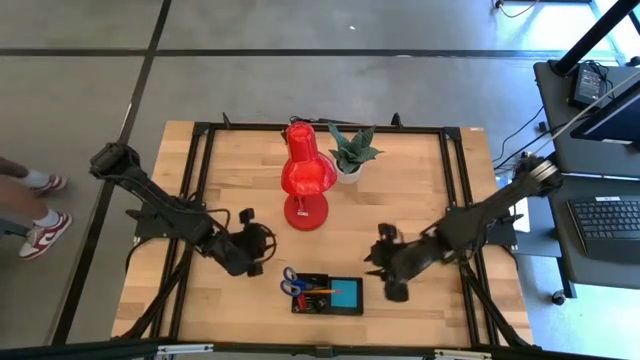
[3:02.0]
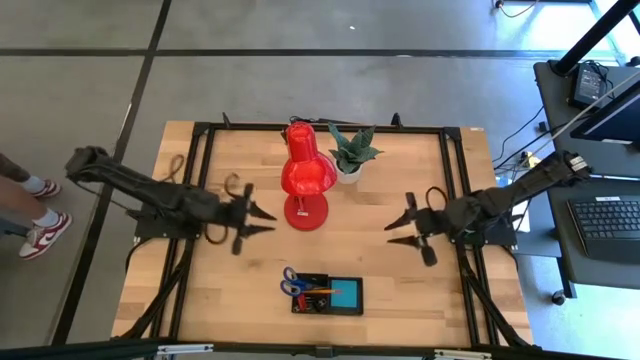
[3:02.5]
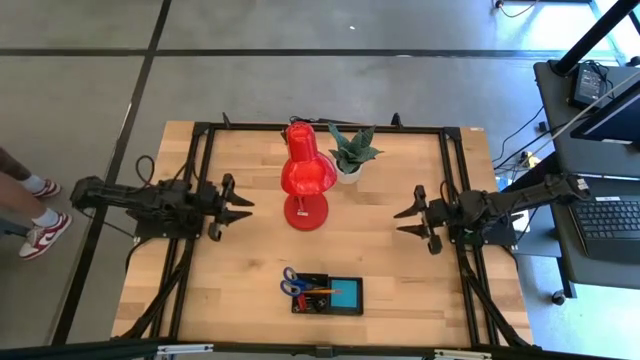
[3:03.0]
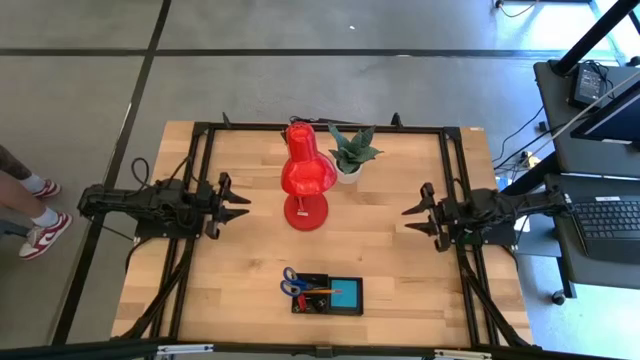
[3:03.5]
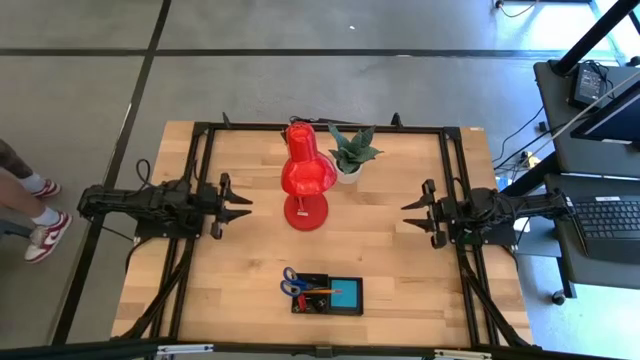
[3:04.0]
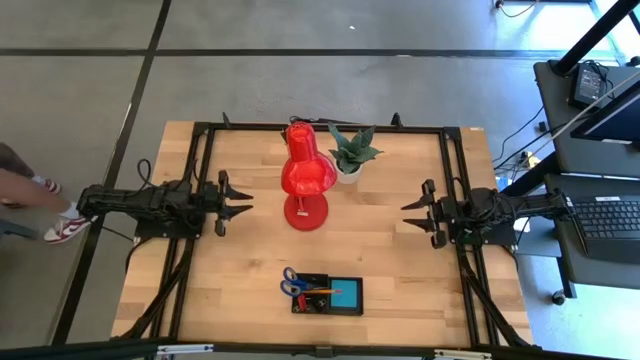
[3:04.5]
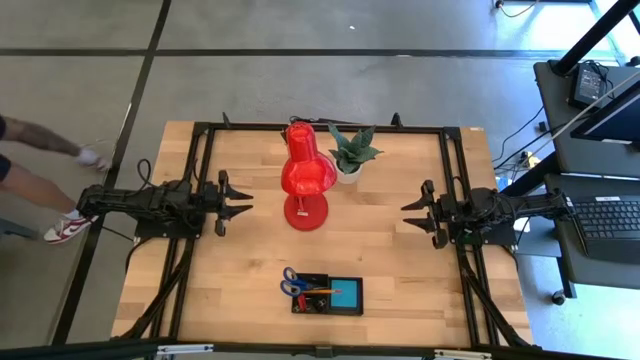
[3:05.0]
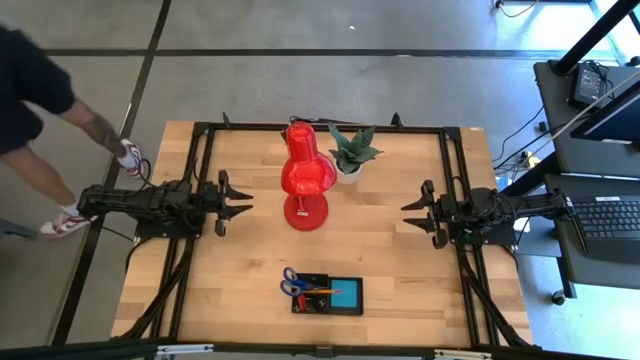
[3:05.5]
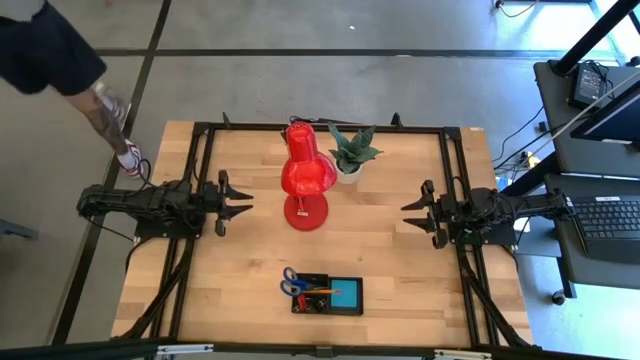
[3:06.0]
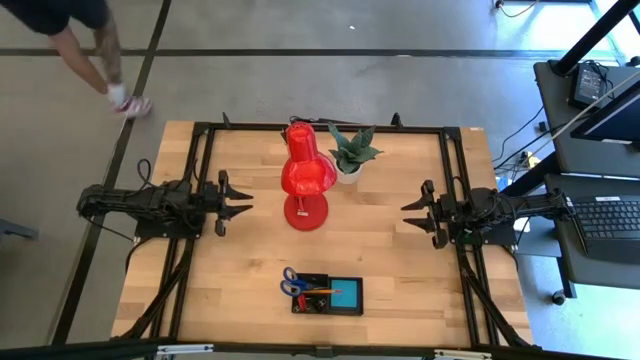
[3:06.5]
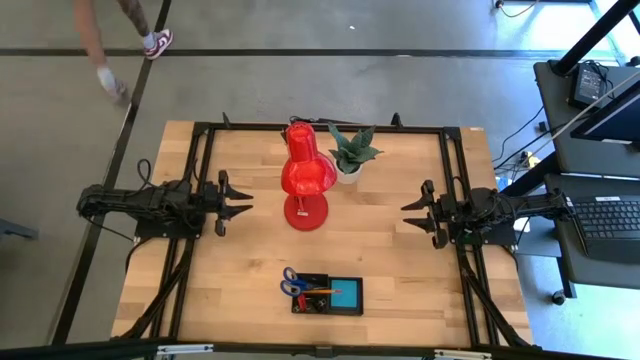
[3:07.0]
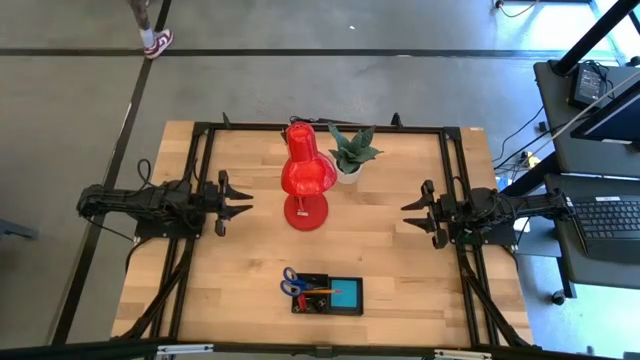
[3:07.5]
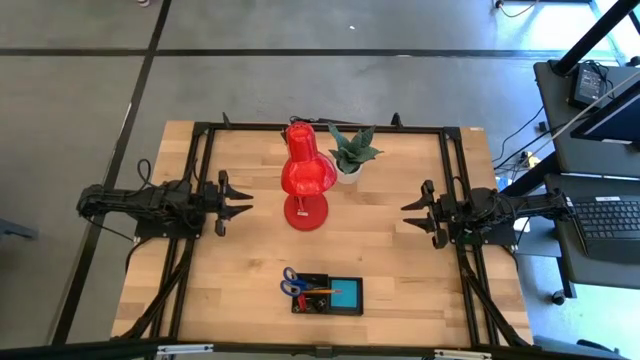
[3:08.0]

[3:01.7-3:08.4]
Task: Pick and place office supplies into organizer
Return to Home Position

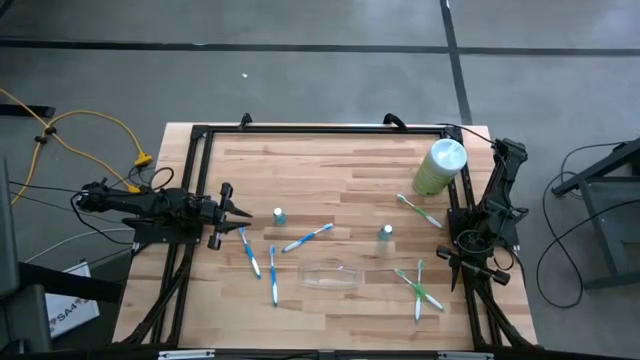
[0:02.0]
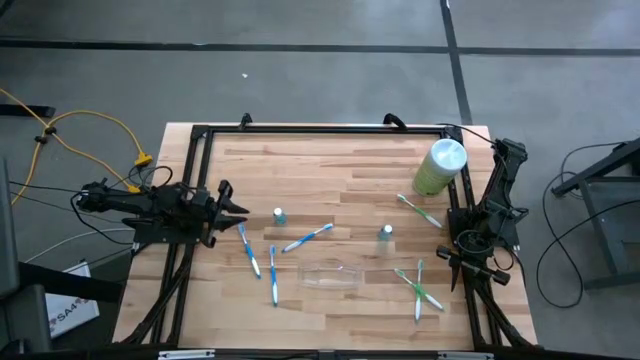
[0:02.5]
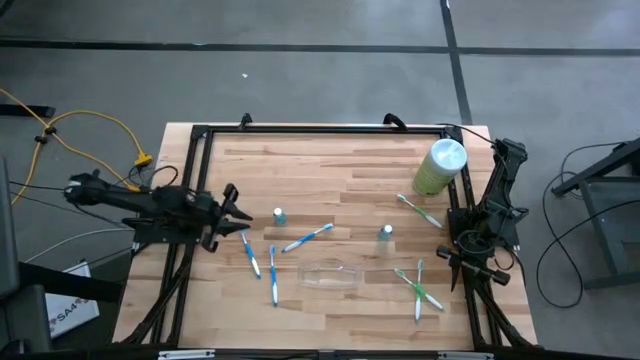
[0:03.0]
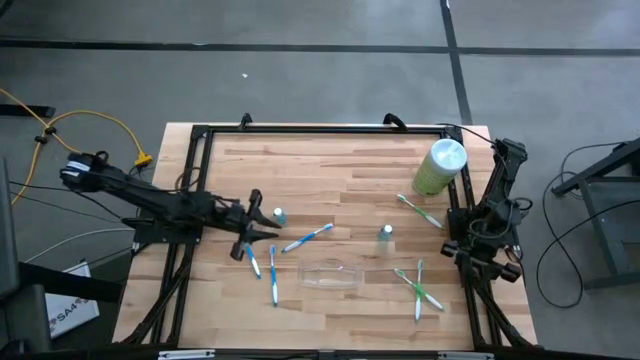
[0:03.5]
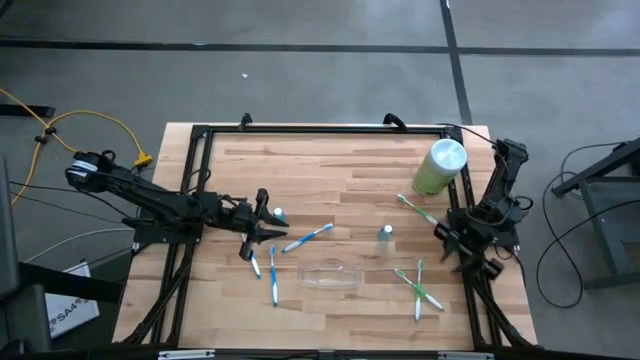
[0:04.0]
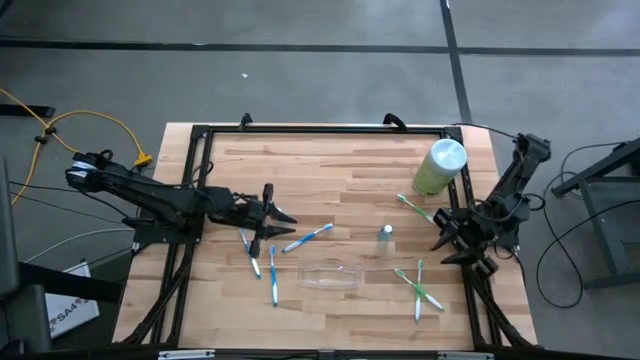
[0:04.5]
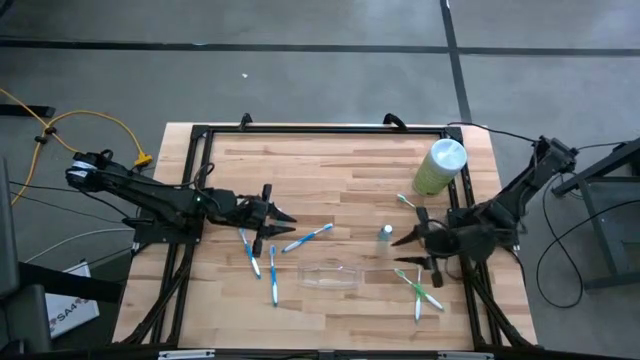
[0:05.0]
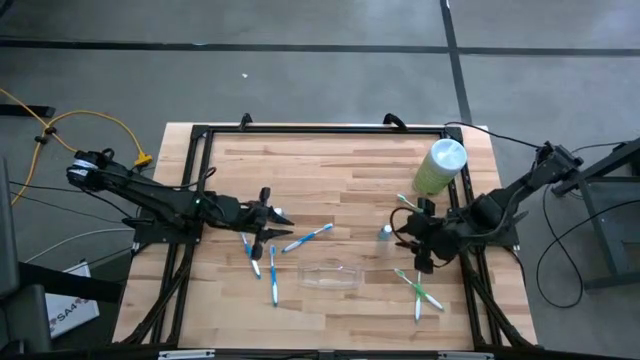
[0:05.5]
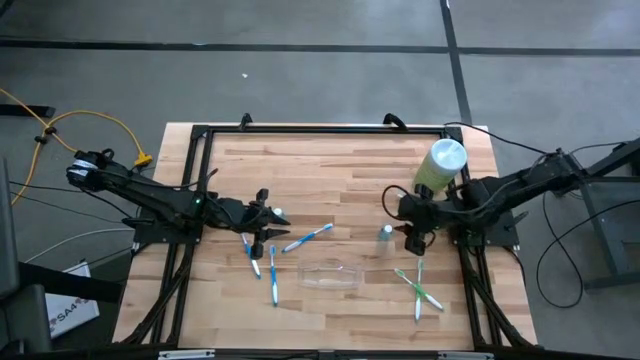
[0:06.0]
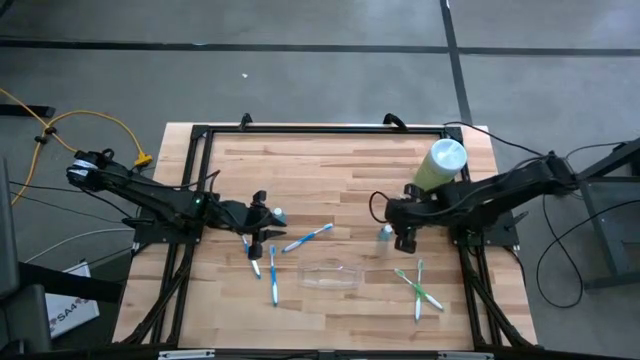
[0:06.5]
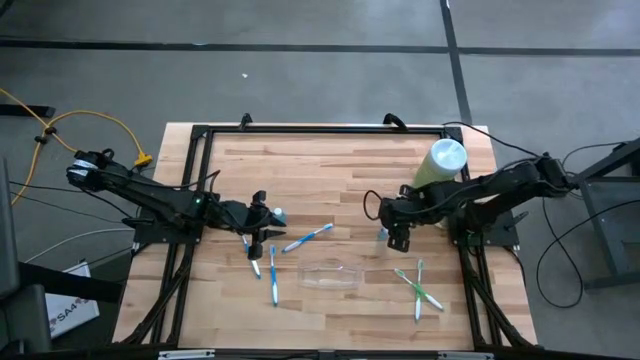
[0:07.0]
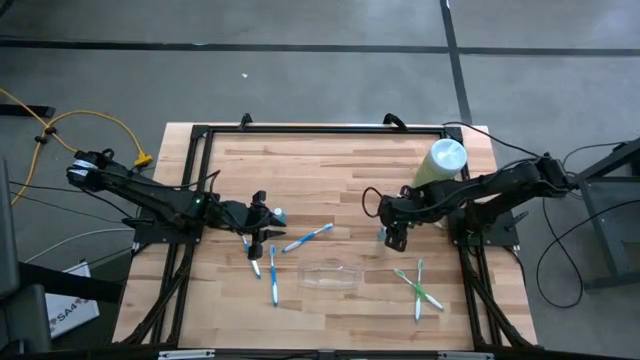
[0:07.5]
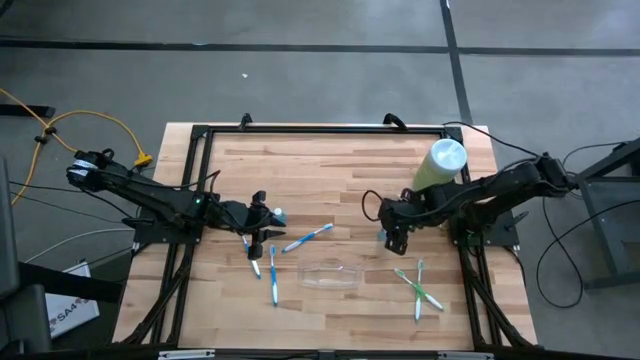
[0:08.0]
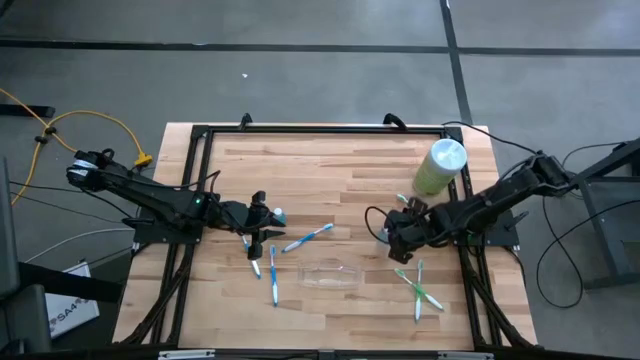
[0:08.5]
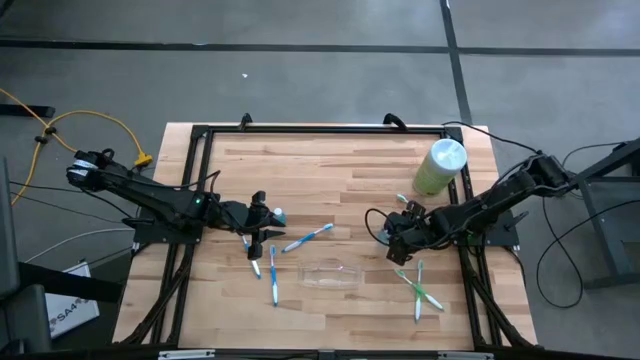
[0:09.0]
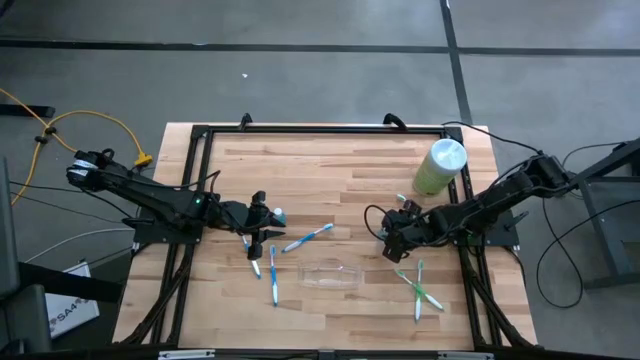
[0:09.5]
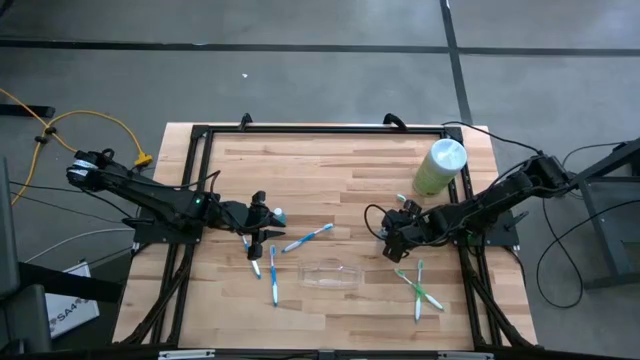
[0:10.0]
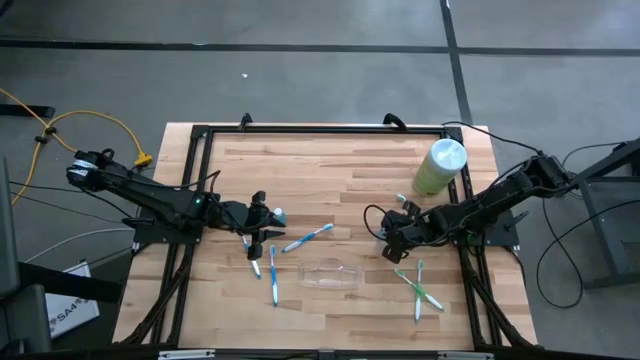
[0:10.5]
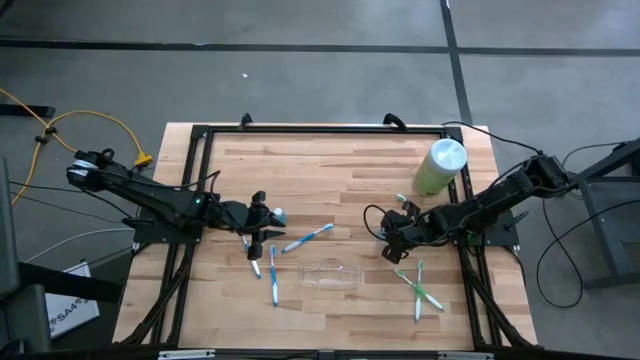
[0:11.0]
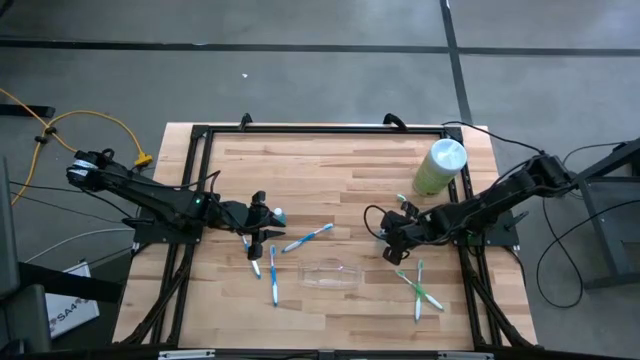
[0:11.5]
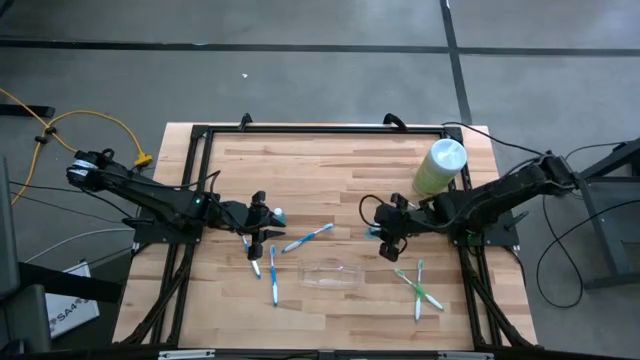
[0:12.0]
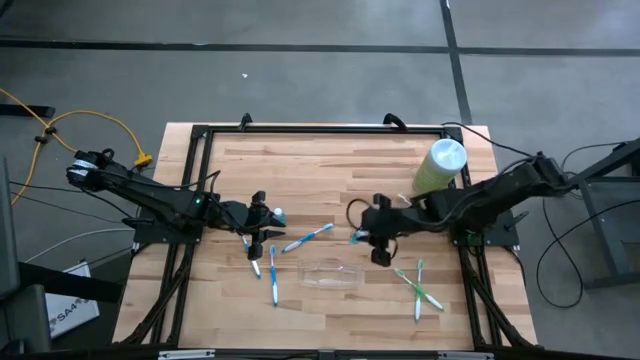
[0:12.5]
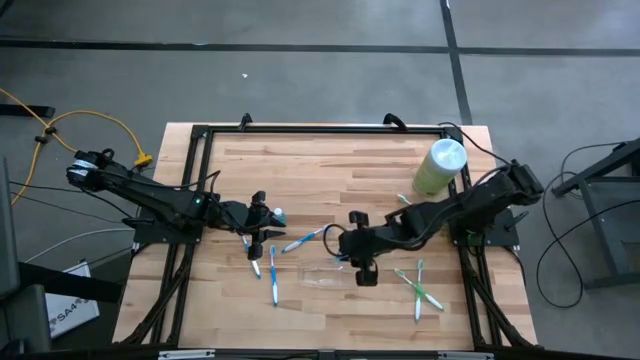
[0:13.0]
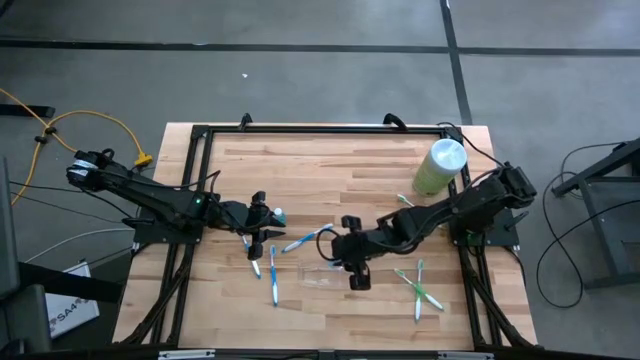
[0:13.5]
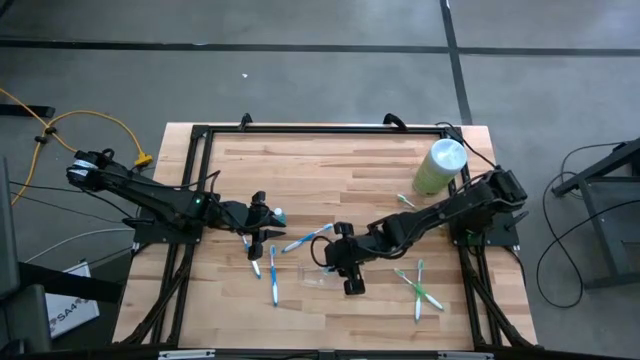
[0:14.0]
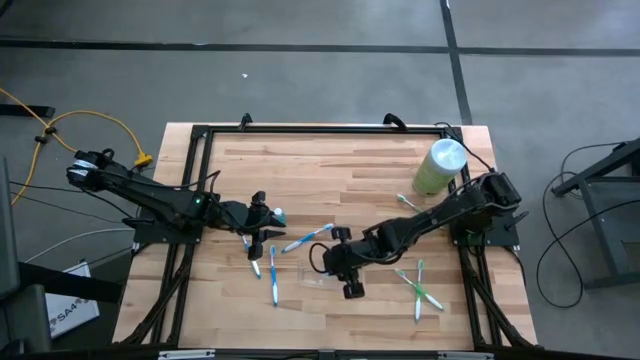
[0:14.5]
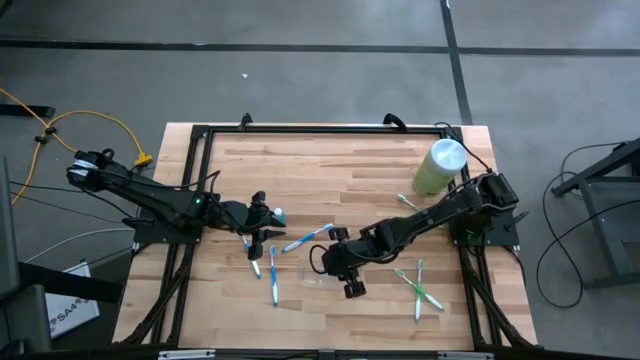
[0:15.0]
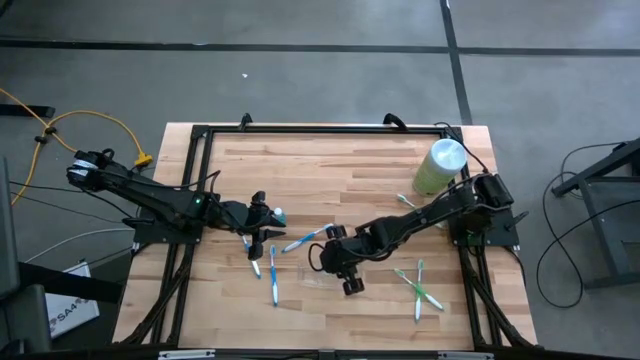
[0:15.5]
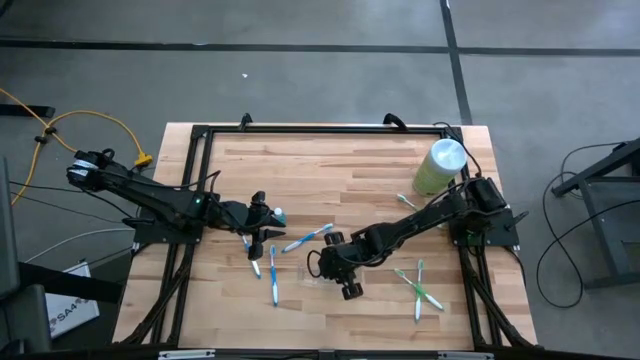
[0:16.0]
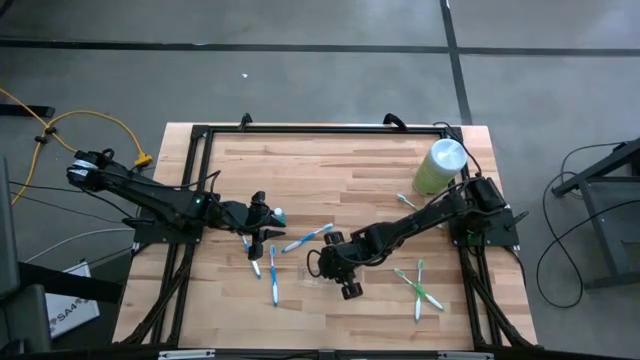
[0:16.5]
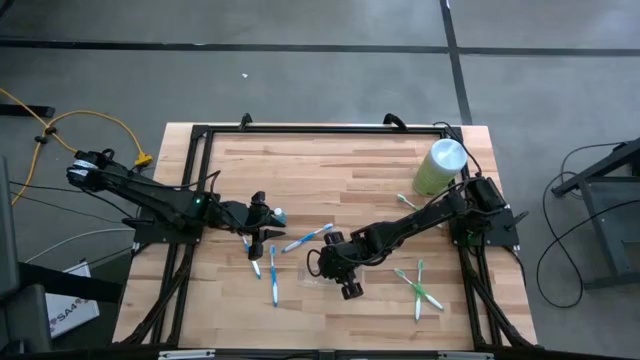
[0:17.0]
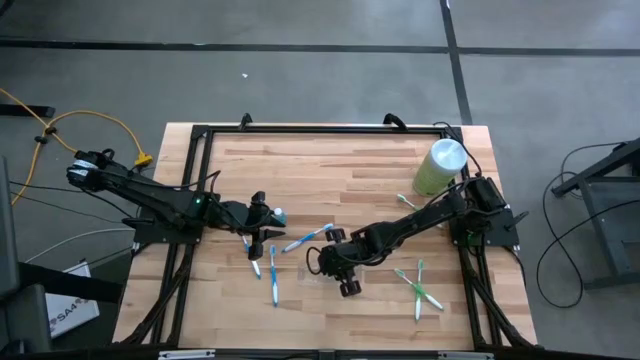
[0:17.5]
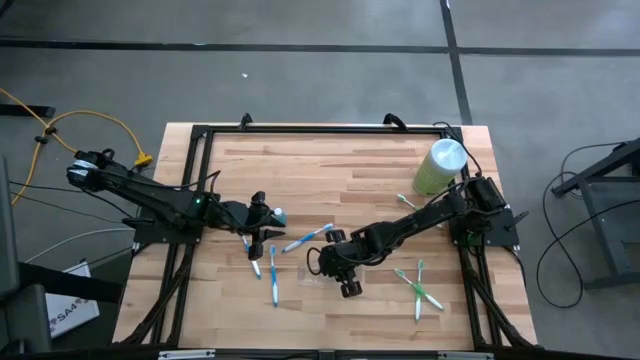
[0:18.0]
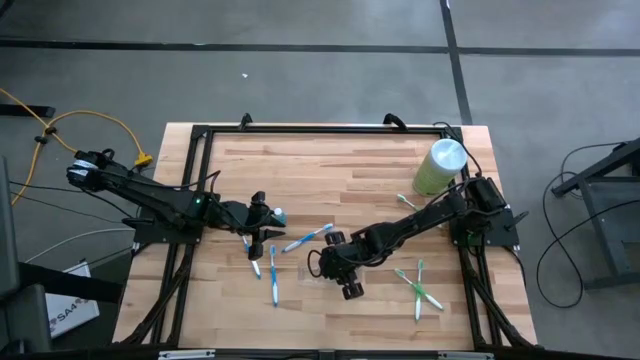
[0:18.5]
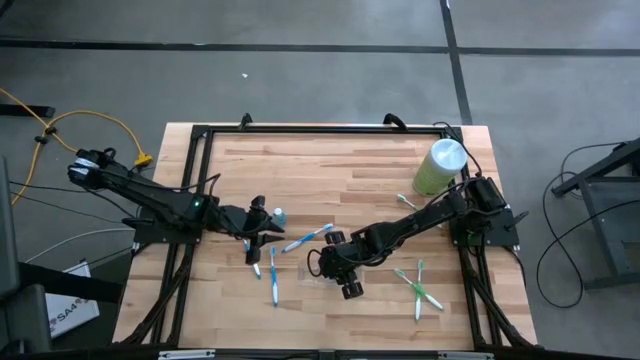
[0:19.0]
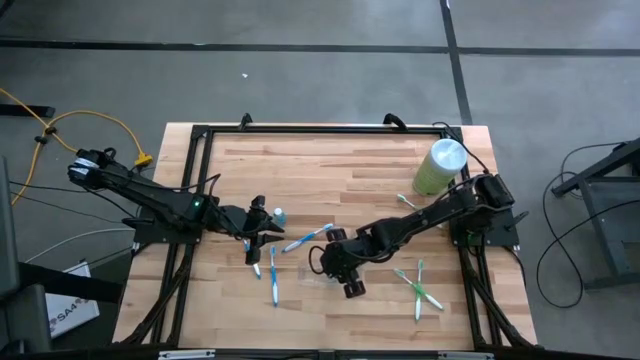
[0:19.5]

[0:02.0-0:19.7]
Task: Pick & Place toothbrushing station
Put the right blue mouthwash bottle into the transparent organizer
